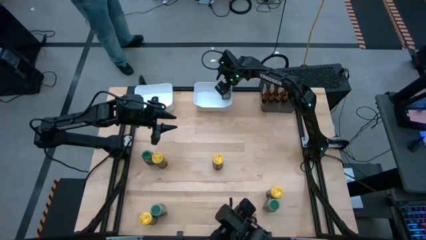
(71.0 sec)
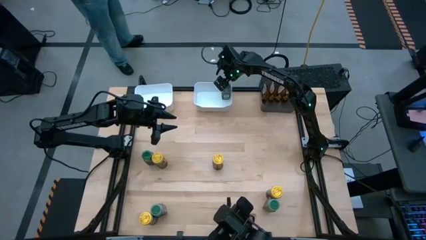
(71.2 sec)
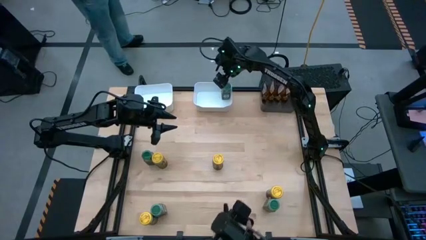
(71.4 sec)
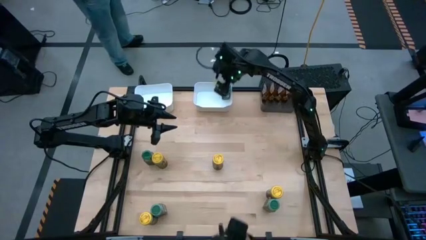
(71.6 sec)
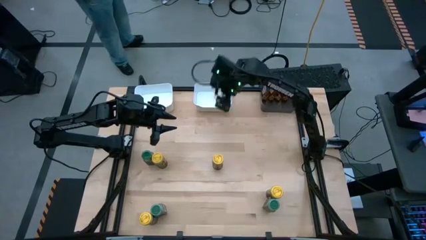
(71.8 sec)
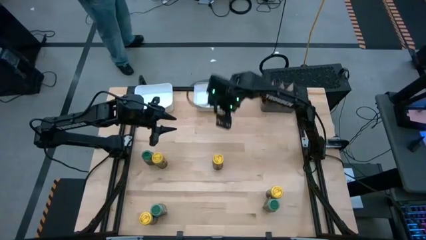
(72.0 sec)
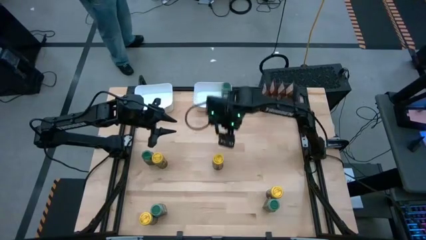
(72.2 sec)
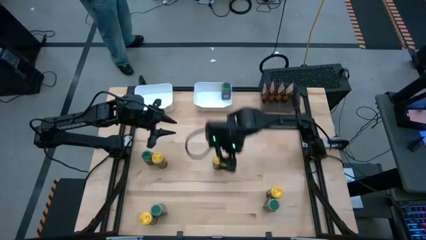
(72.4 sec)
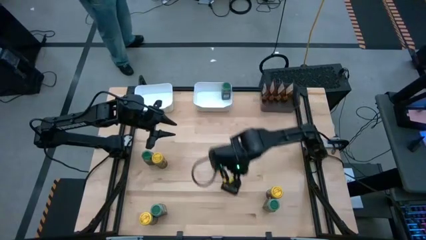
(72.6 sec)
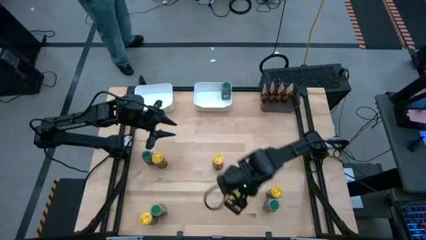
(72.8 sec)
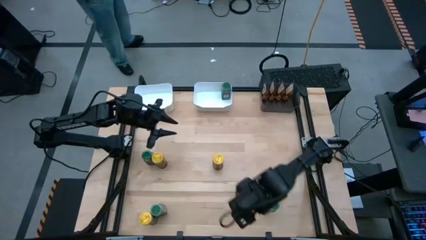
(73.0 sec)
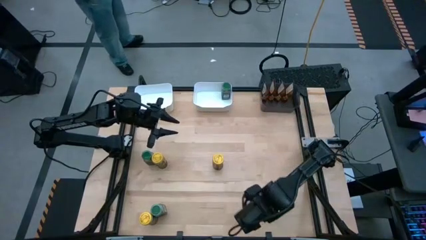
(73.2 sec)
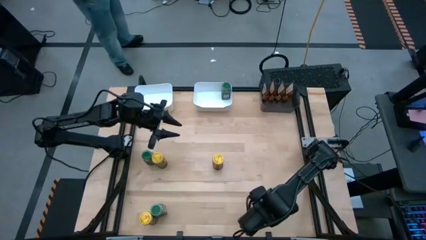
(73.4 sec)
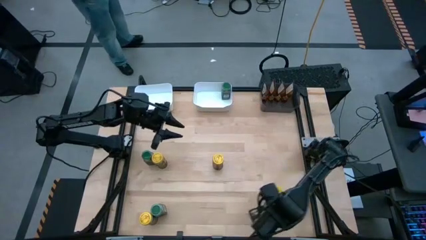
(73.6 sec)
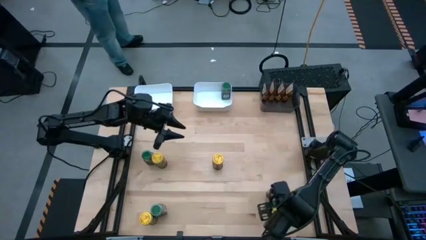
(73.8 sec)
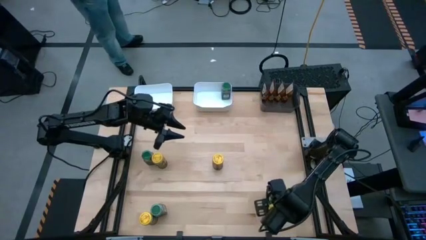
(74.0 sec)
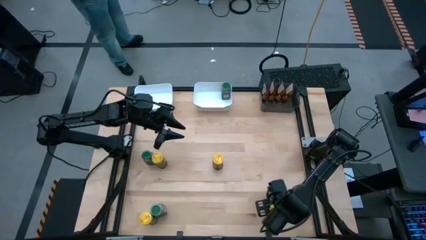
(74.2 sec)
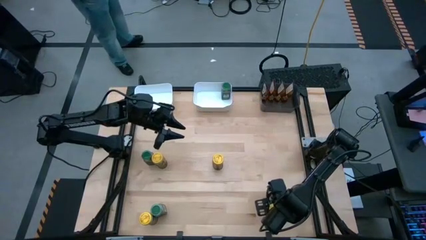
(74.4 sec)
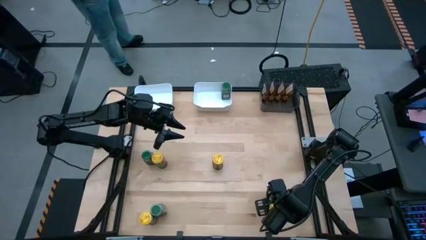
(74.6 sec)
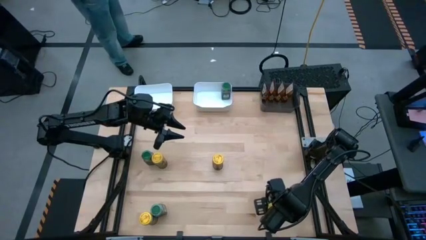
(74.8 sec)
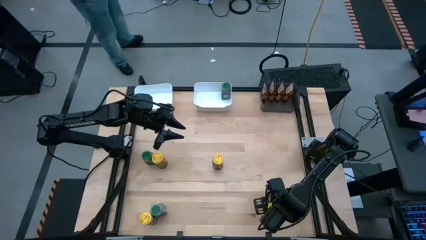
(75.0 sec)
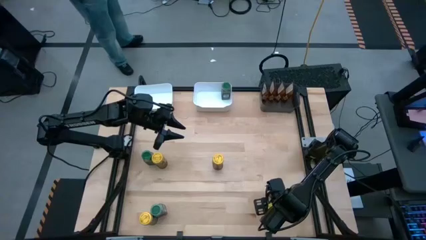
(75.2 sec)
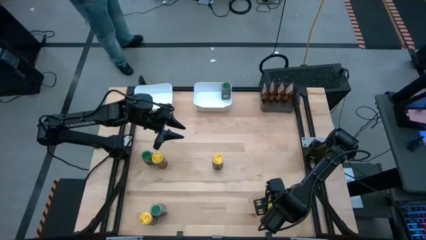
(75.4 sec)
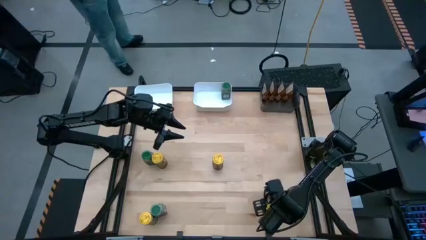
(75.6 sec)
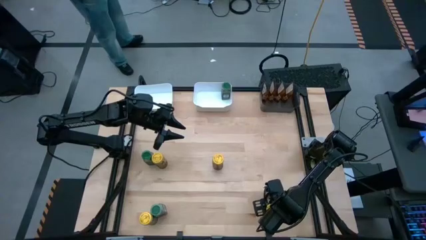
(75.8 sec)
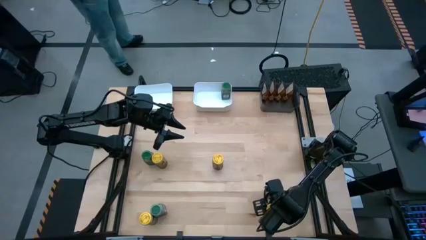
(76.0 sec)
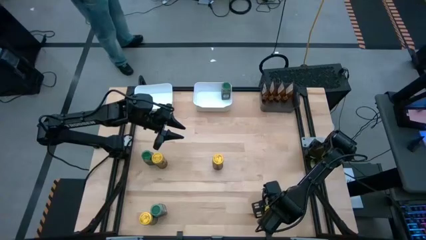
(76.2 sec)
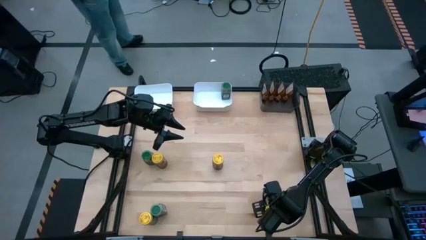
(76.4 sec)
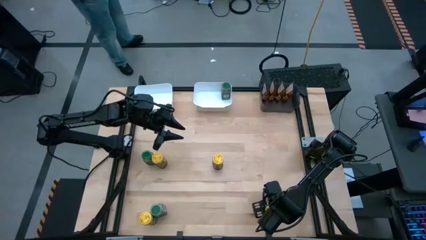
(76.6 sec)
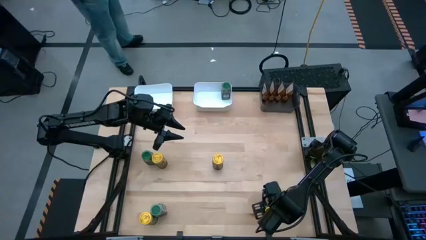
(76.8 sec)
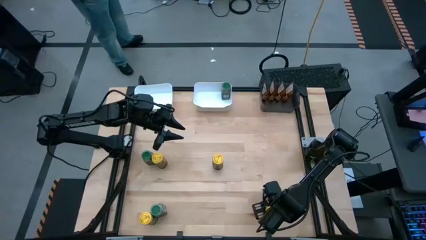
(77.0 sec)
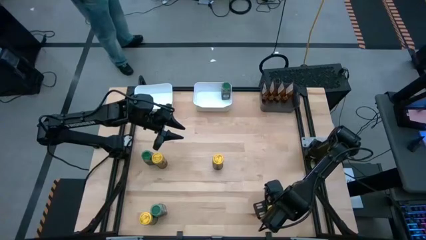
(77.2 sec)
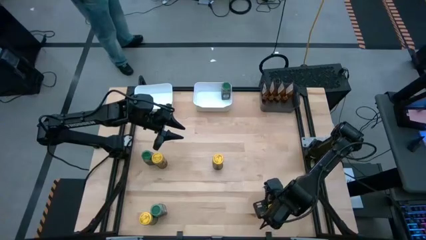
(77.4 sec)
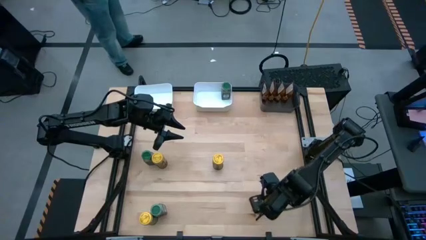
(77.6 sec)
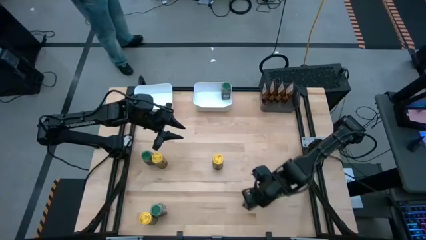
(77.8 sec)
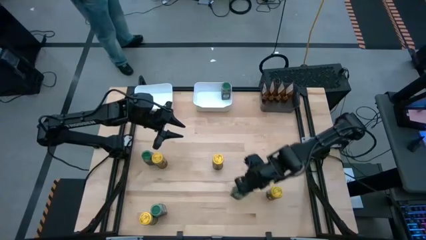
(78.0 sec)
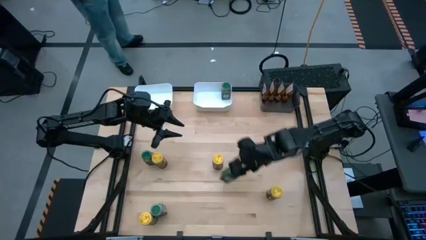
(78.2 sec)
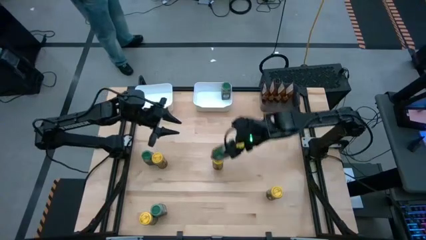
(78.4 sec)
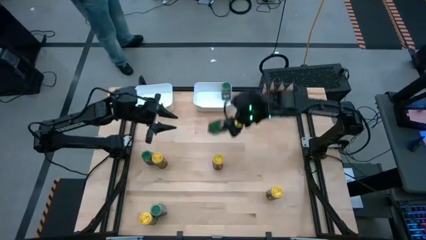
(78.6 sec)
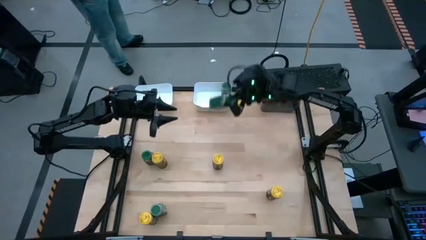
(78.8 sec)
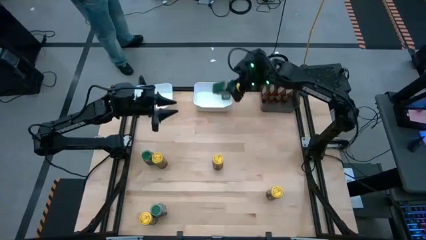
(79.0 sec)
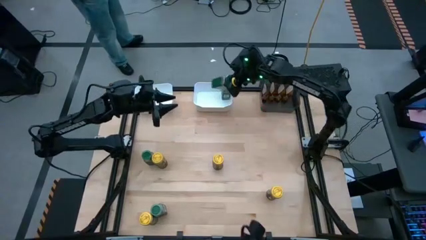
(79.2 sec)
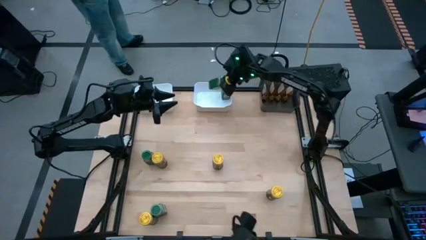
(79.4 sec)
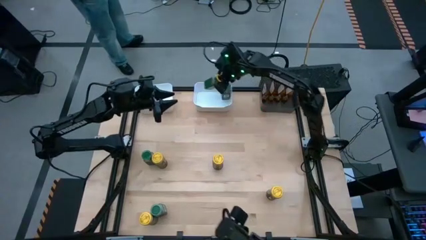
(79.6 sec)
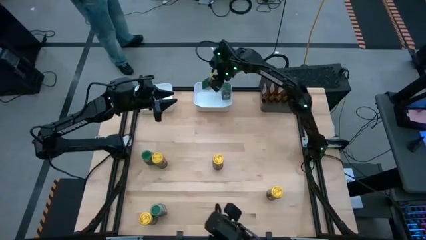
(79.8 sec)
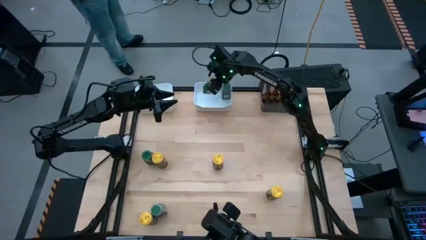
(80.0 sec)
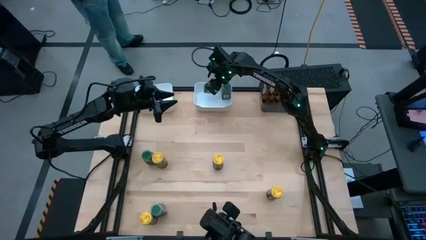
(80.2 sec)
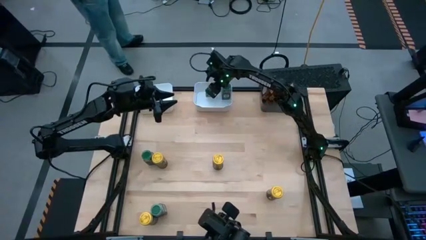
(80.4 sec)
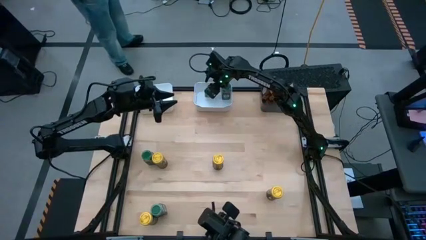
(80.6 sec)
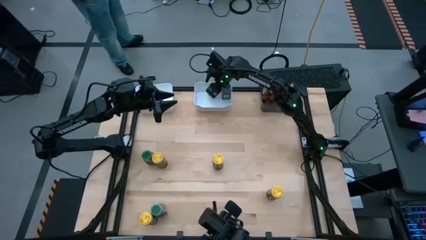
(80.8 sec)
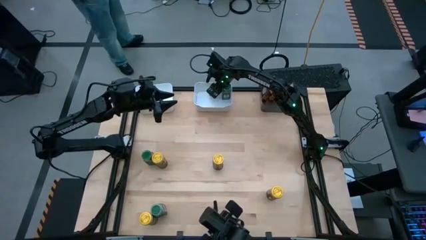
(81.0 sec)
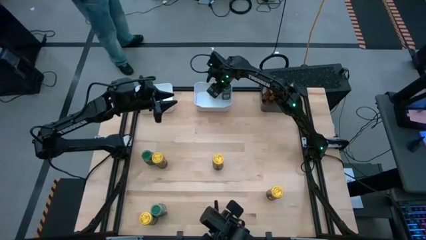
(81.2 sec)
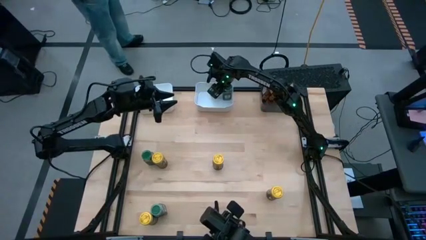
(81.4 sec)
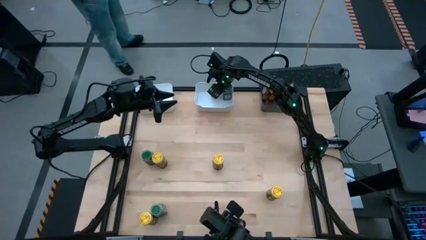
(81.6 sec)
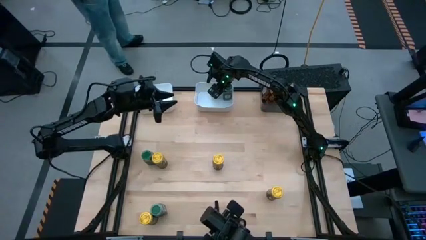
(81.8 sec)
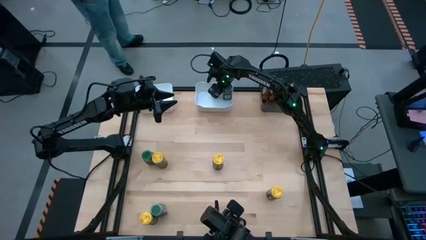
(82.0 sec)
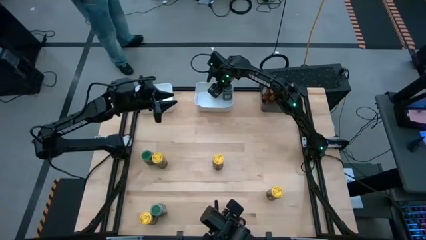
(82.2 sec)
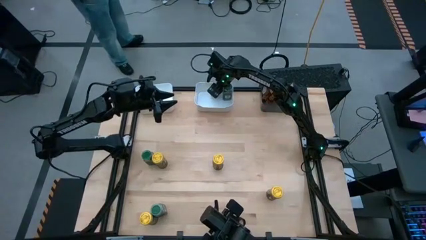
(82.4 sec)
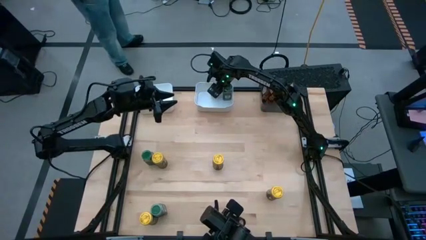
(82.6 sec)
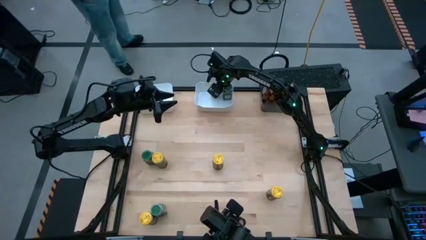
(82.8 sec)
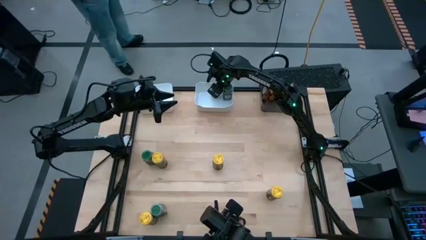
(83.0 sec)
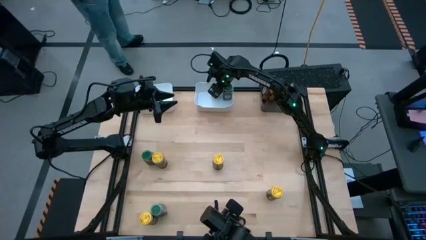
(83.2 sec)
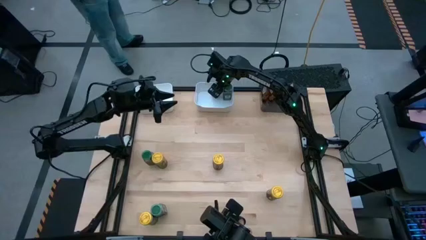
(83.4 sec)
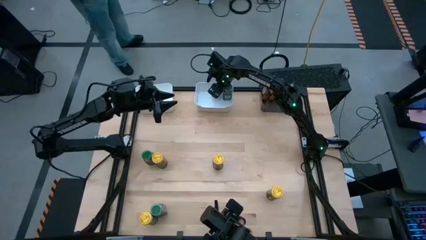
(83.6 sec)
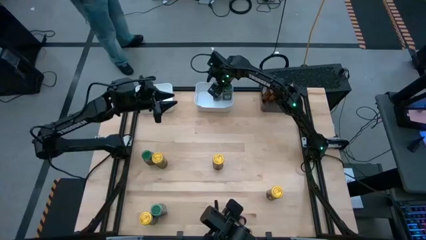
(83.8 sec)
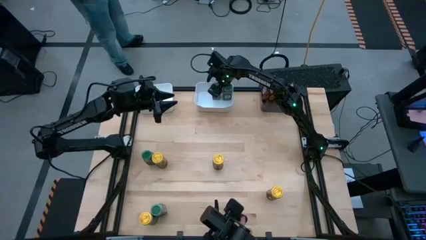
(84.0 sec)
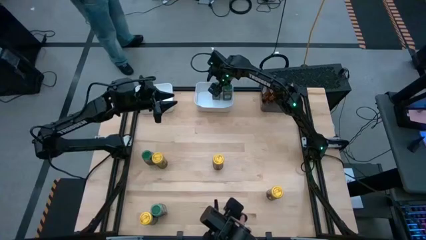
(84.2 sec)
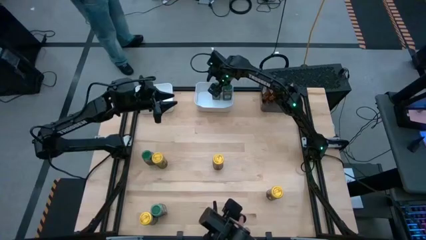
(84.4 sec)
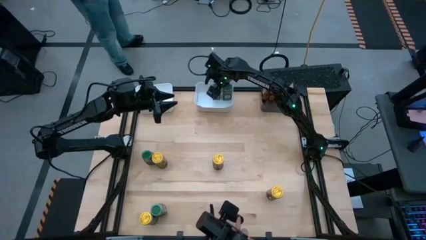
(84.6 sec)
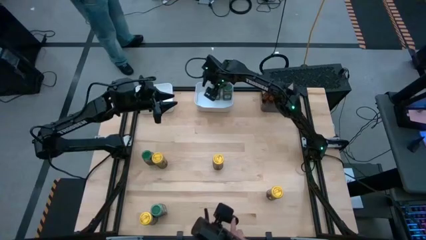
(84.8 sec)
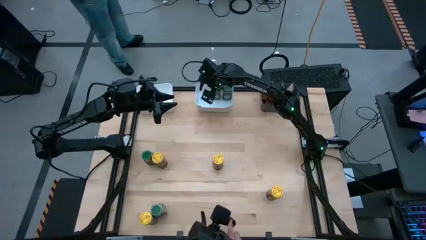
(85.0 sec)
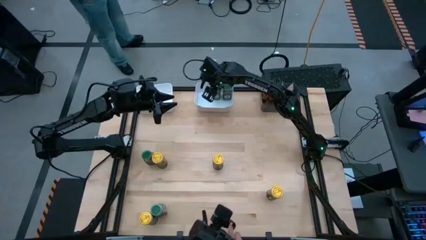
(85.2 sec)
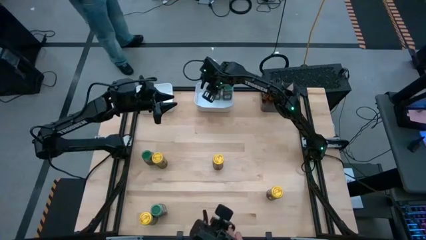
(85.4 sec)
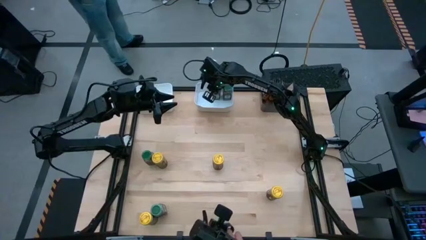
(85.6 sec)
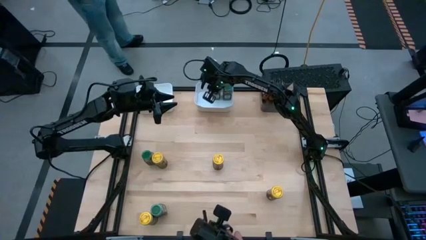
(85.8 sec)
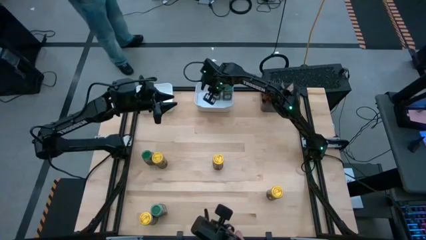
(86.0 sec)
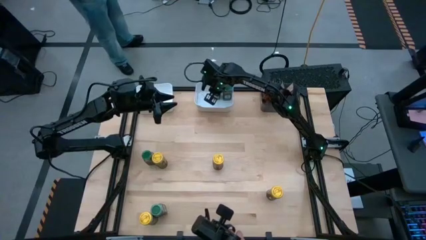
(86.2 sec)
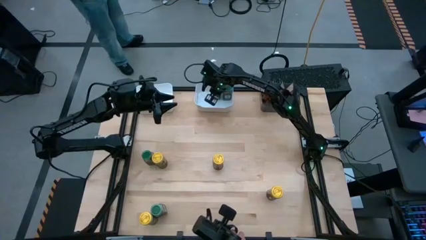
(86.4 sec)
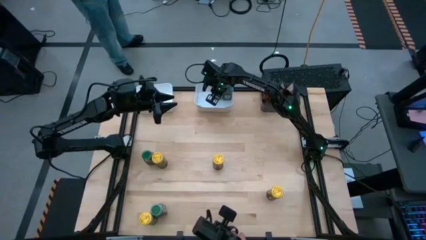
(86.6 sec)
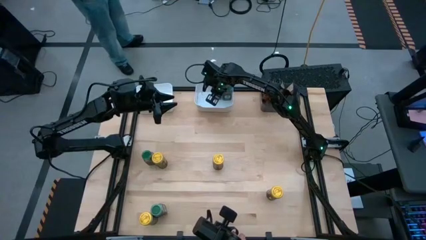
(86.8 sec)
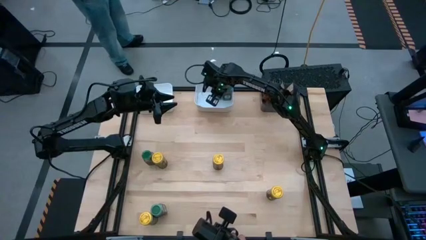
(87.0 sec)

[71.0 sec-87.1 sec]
Task: Sort spices by type
Put the bottom right green seasoning bottle into the right white bin
